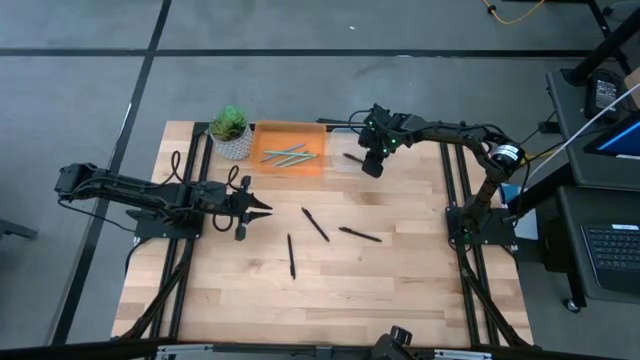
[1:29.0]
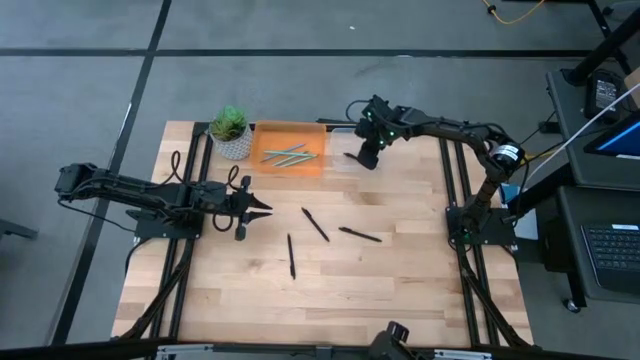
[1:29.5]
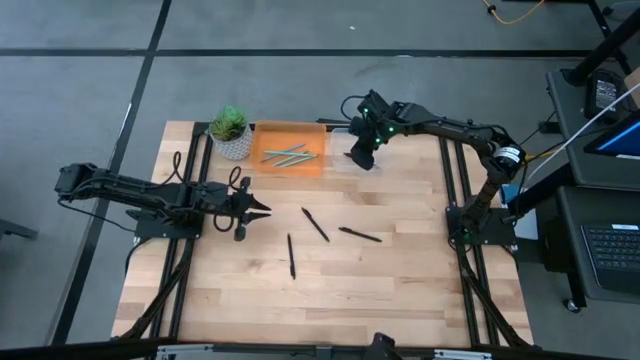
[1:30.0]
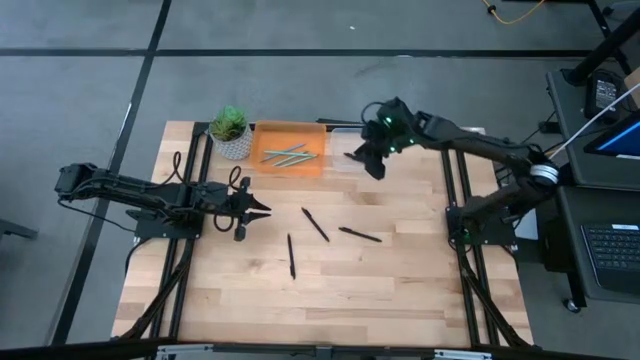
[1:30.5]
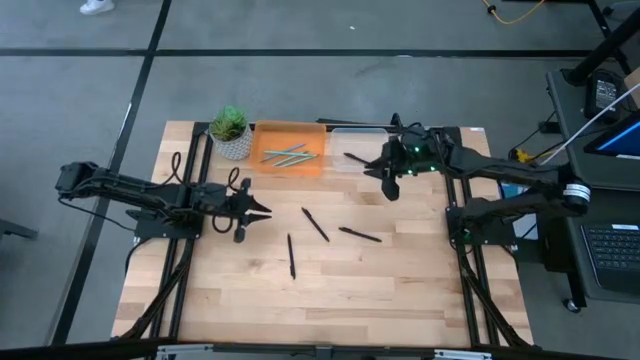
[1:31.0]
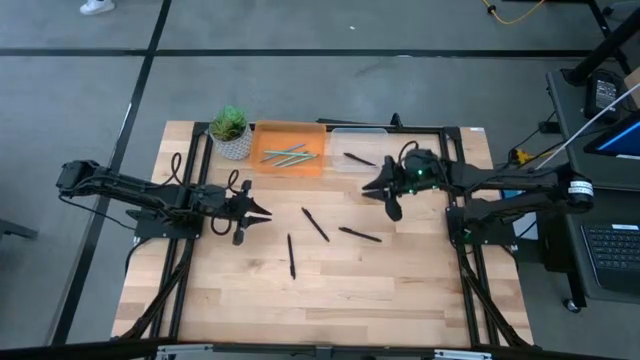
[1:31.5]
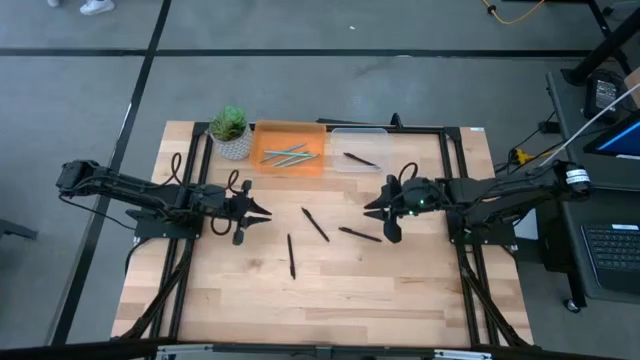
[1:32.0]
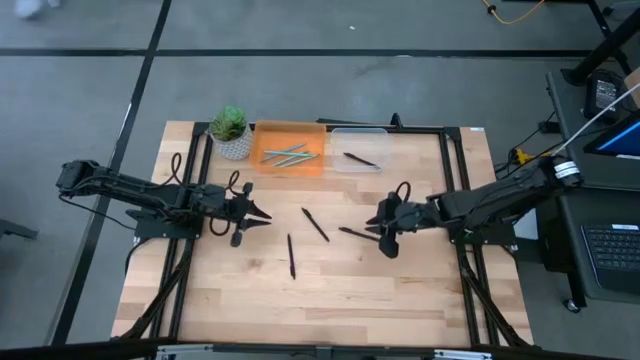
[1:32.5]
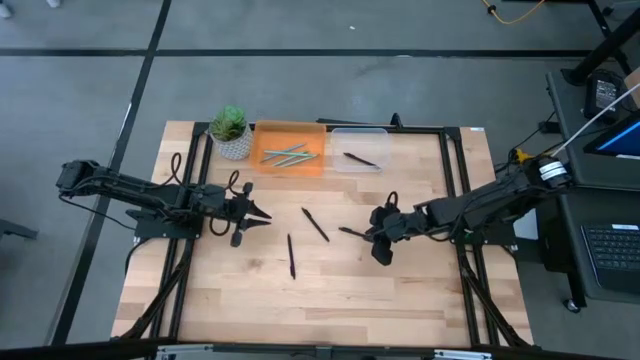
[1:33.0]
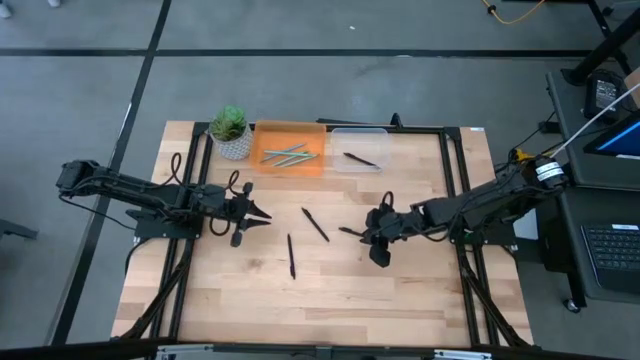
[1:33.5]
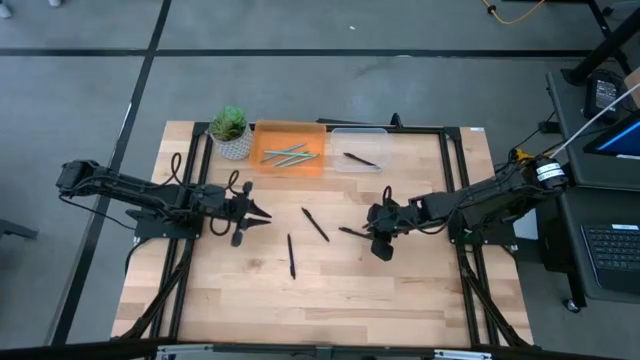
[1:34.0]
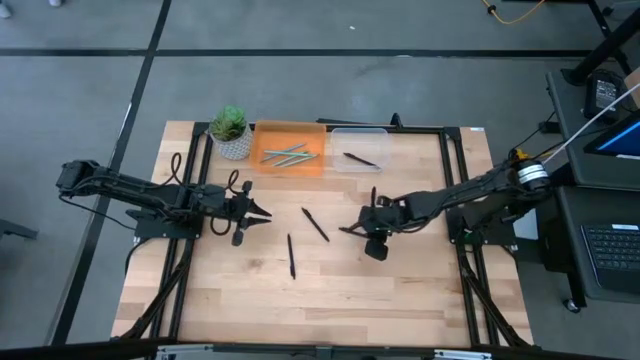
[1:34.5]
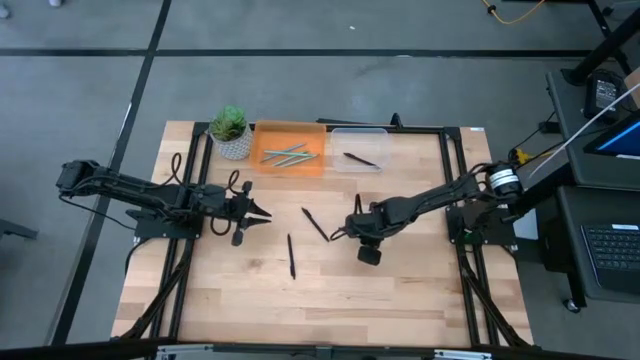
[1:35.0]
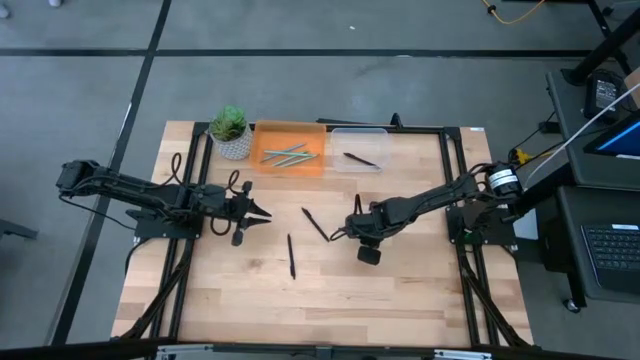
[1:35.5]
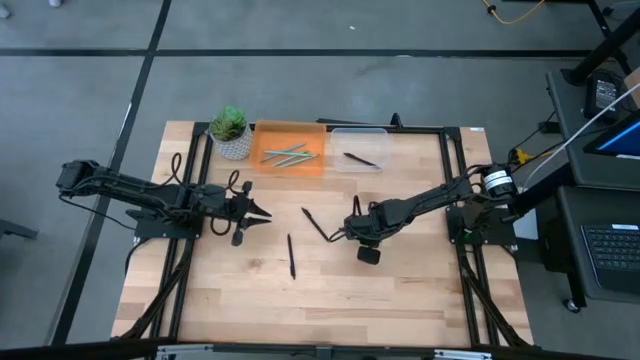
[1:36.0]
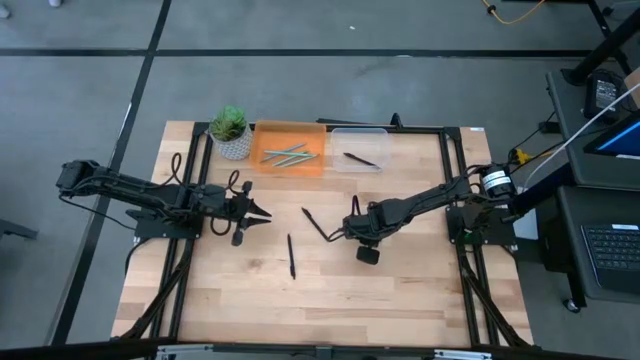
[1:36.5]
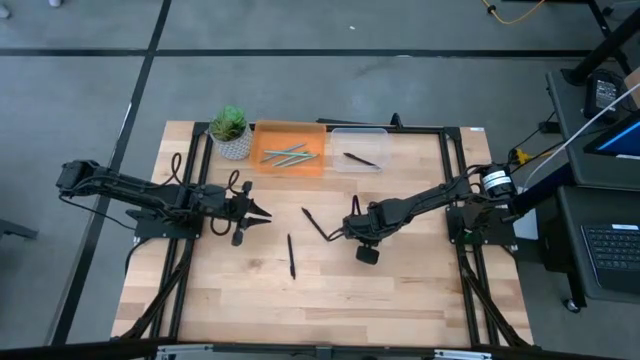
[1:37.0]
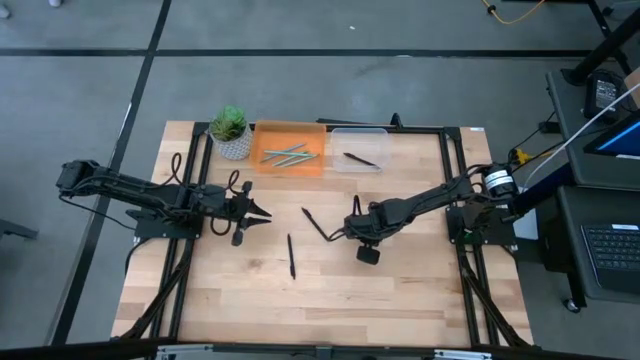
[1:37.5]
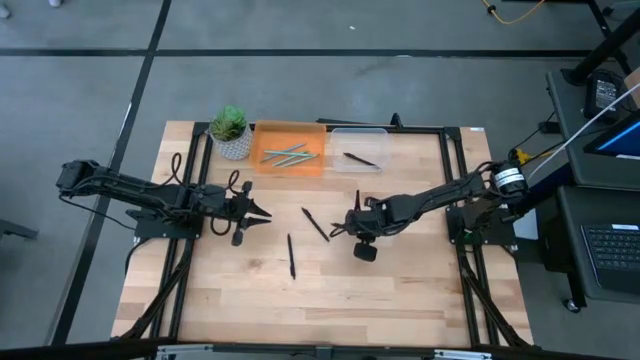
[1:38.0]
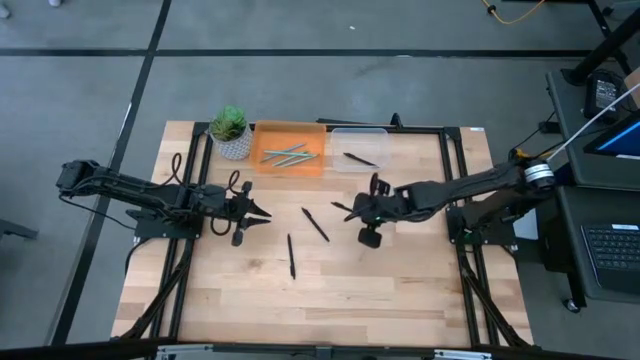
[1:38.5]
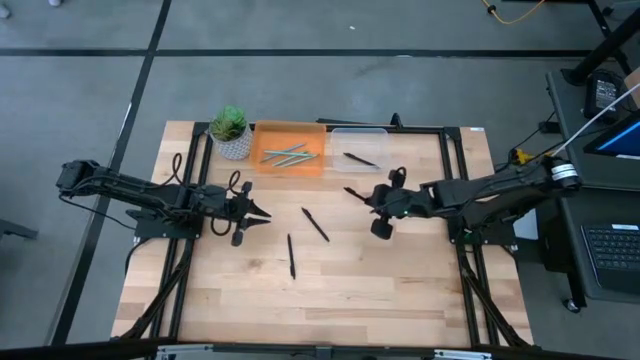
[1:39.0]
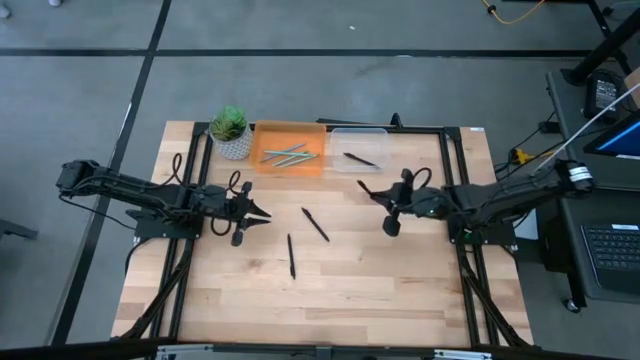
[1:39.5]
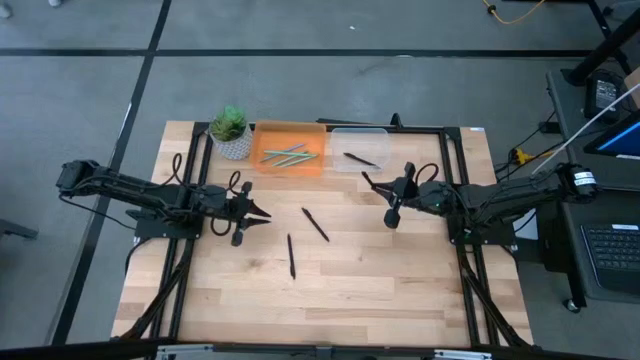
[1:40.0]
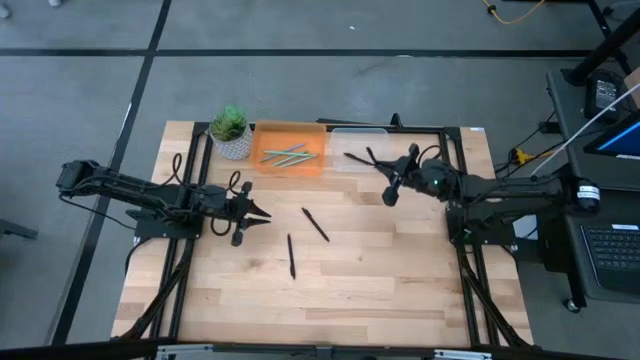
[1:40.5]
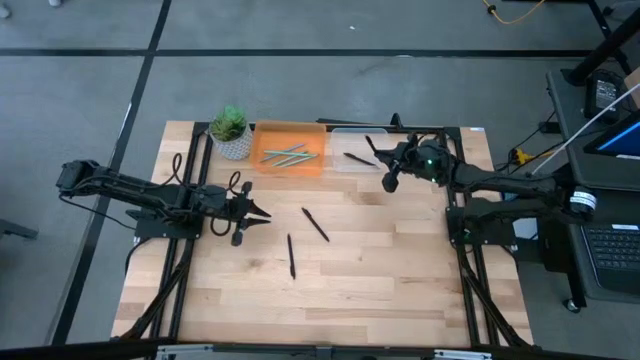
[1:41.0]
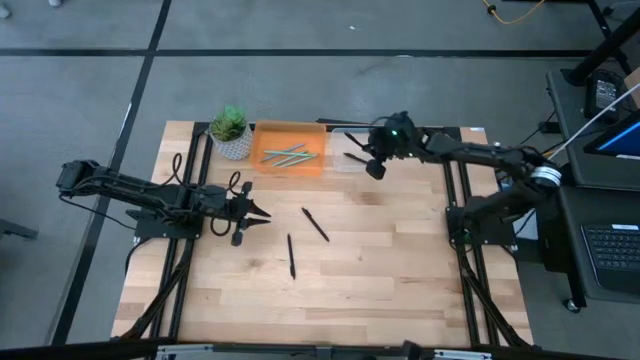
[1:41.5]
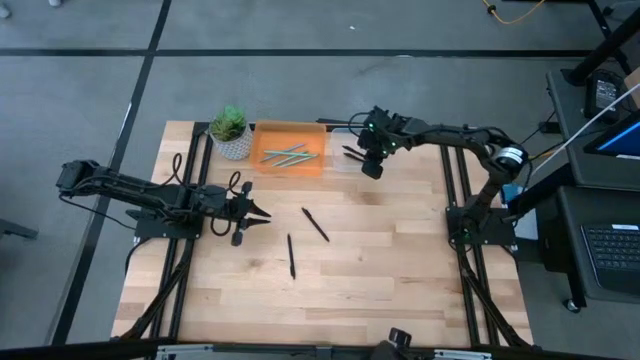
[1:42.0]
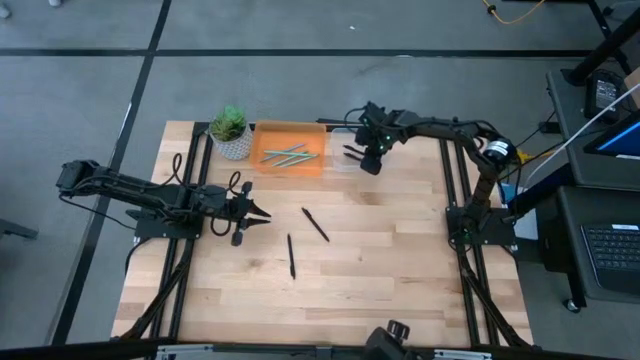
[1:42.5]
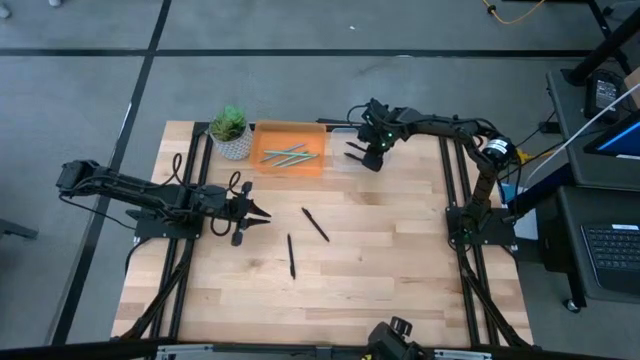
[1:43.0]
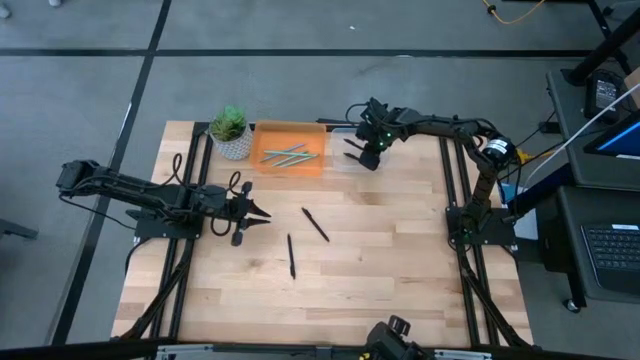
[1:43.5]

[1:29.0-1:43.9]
Task: Sort pens & pencils
Put the black pen into the transparent bin

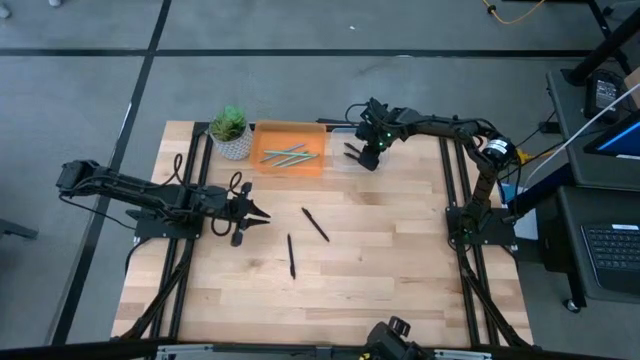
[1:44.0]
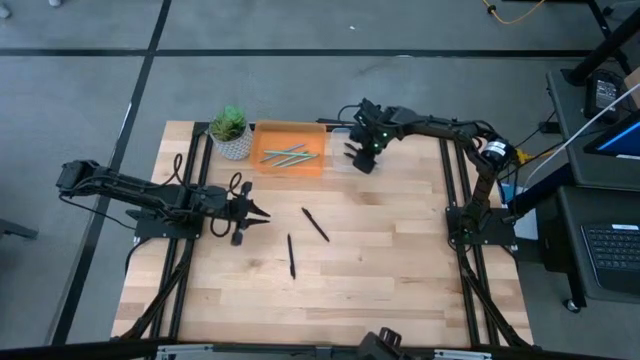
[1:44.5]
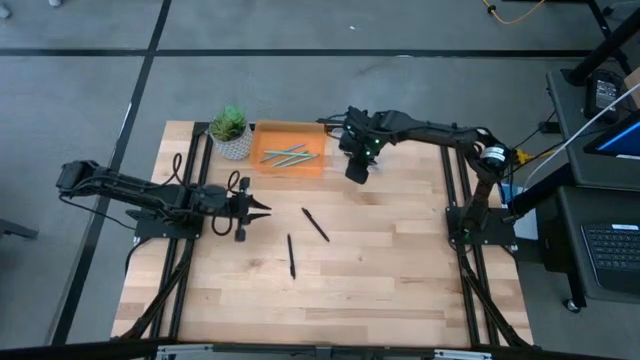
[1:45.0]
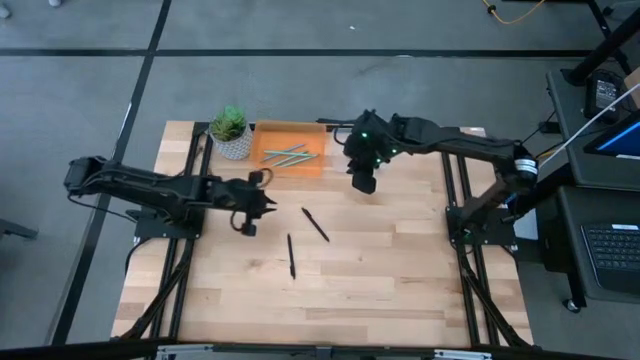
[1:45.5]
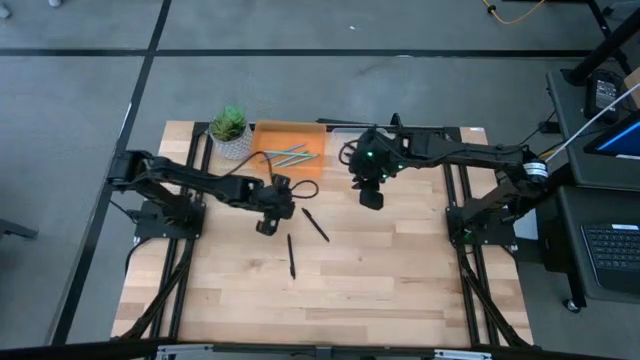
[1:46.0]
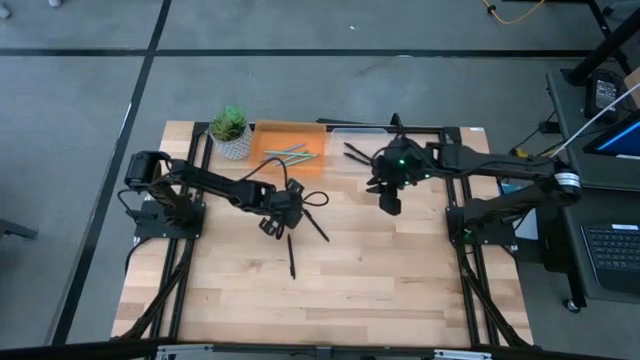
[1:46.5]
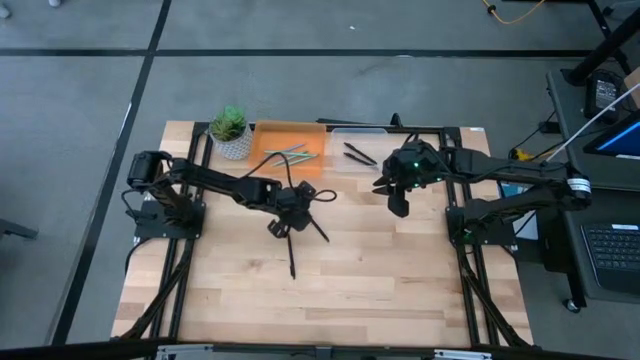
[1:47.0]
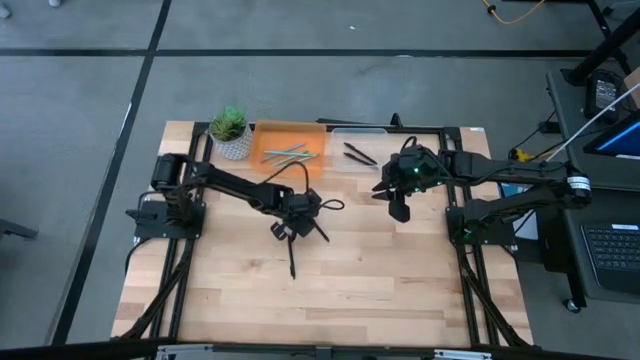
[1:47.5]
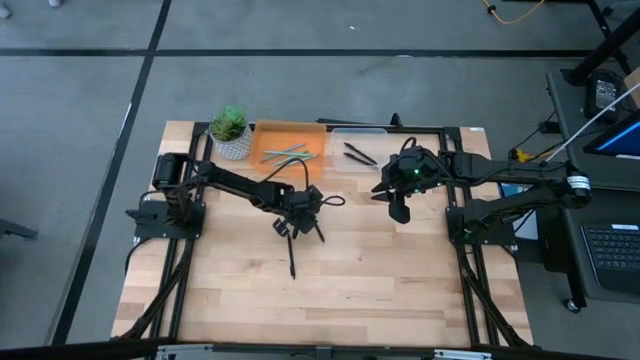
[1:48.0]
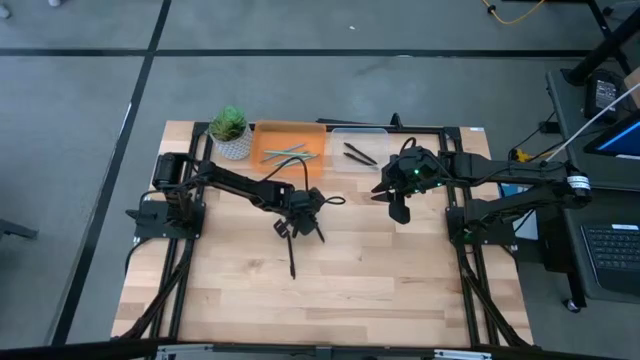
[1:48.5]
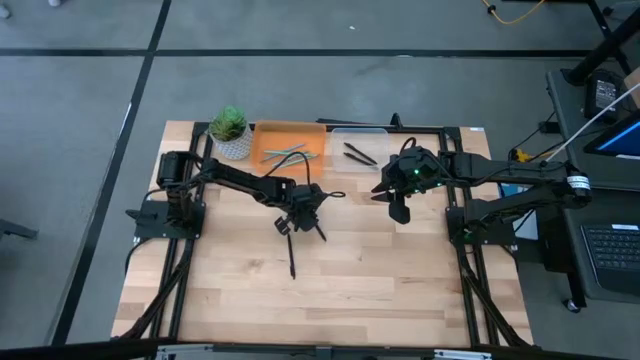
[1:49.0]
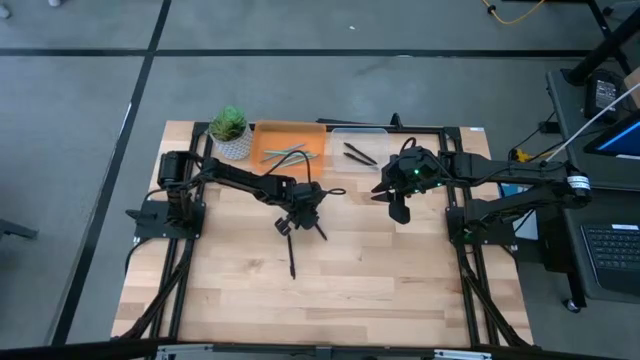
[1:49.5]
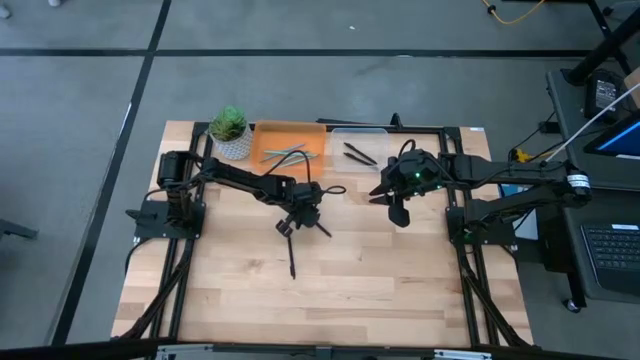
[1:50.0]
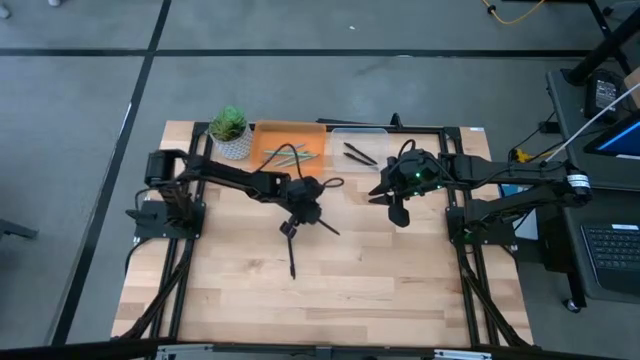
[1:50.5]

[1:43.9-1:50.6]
Put the black pen into the transparent bin
